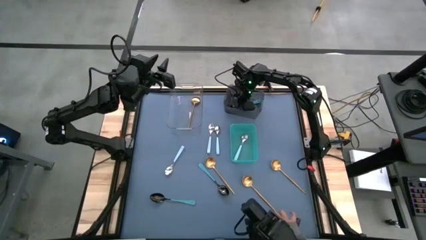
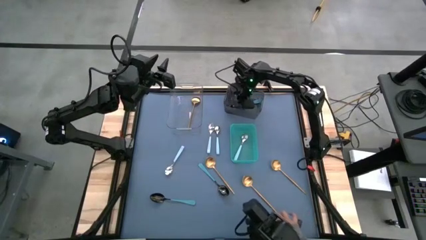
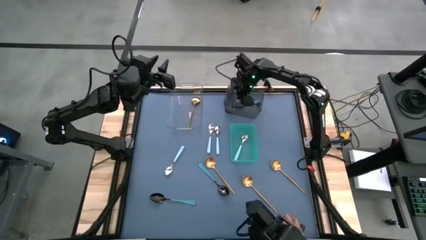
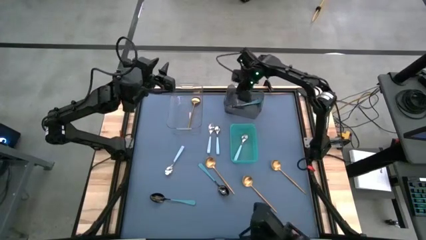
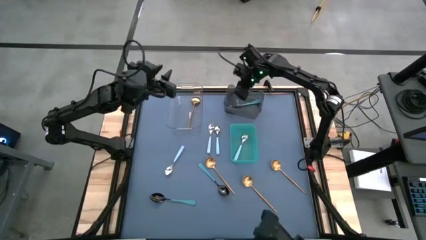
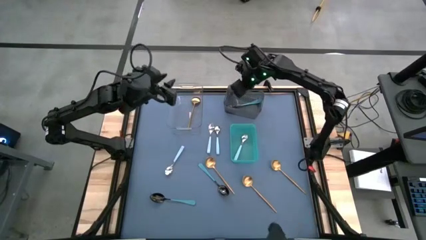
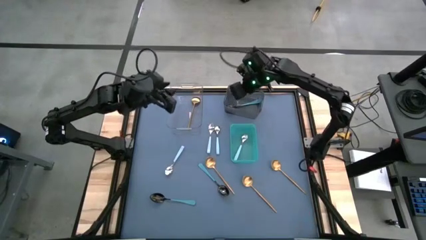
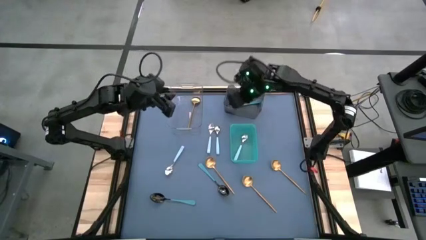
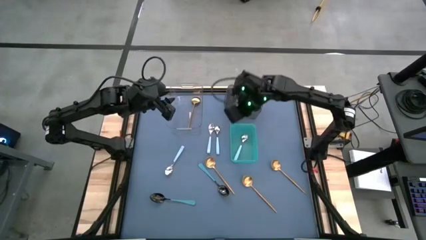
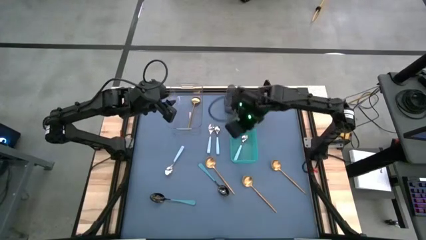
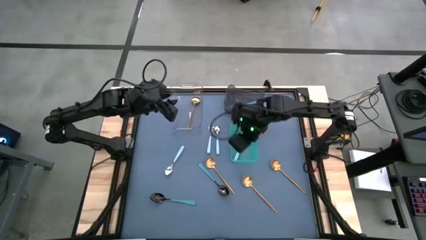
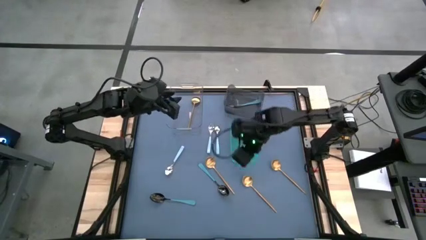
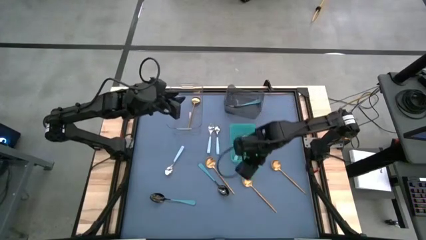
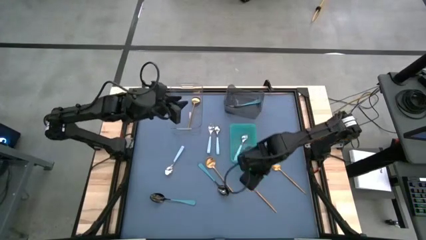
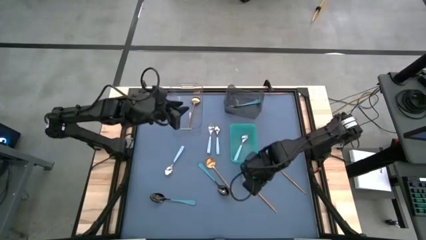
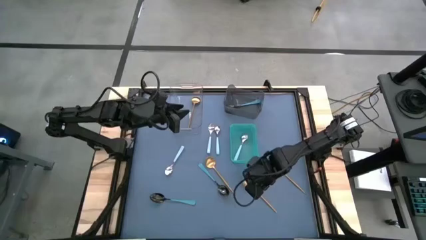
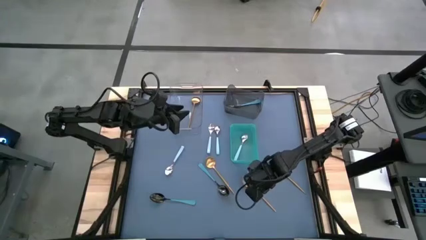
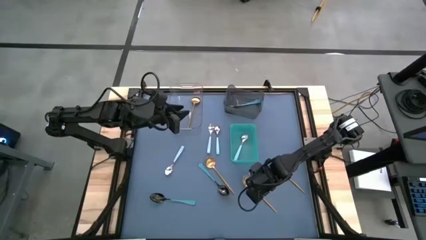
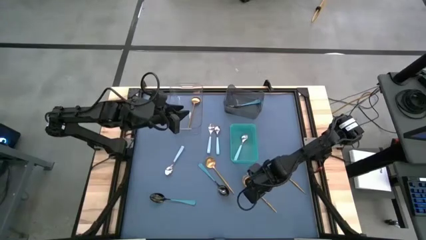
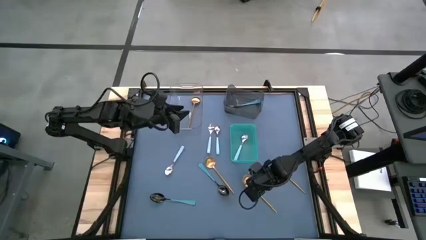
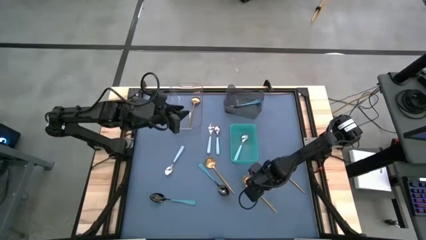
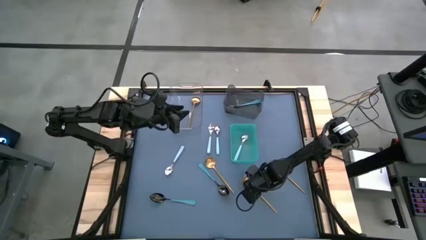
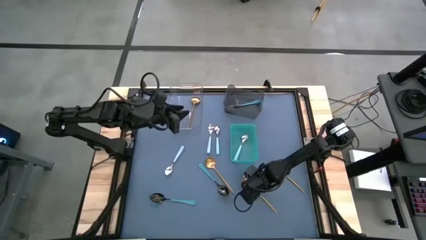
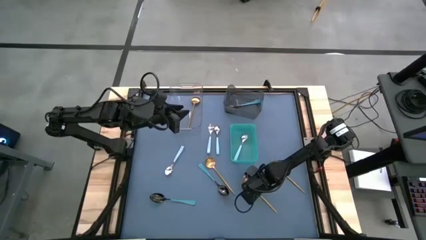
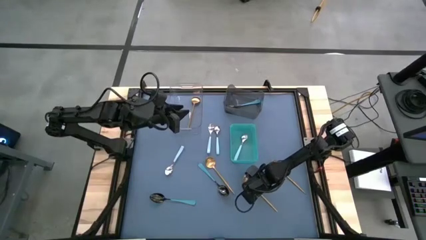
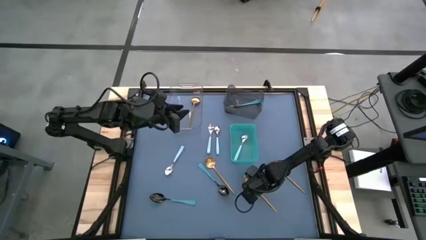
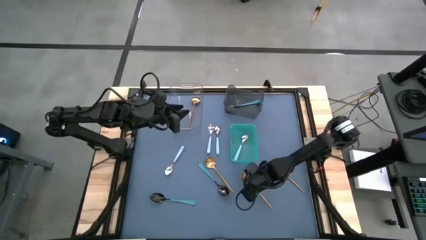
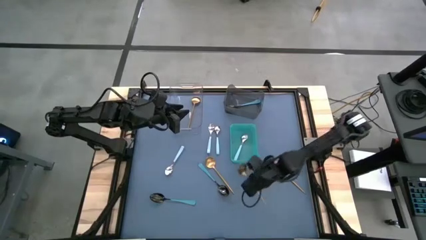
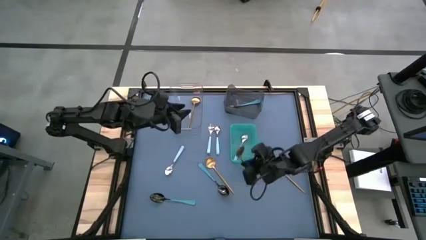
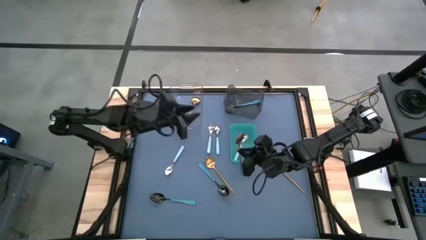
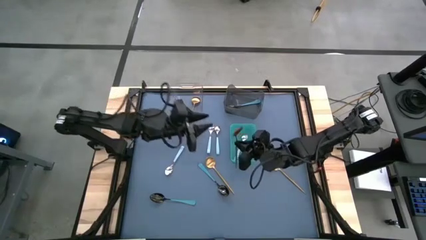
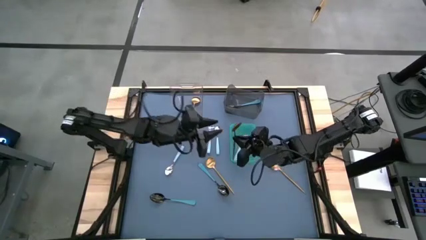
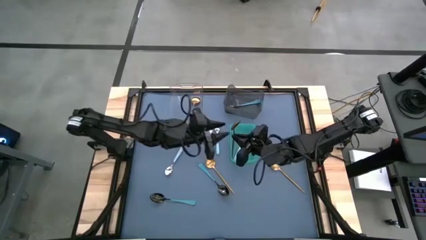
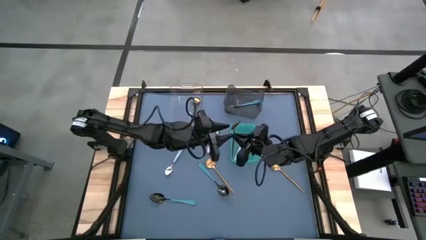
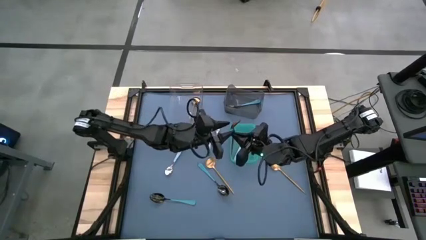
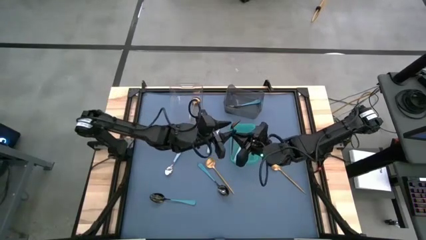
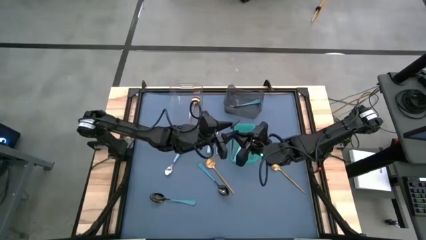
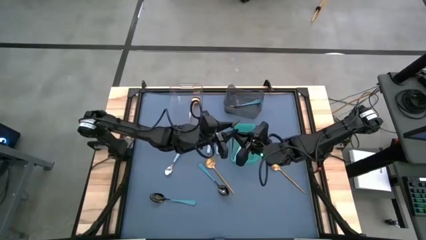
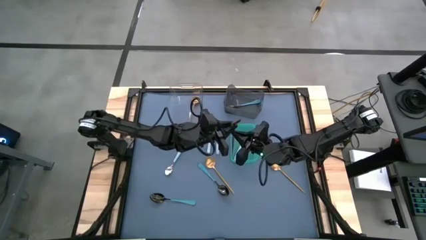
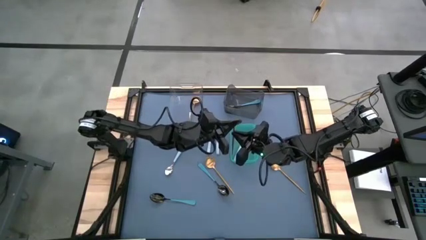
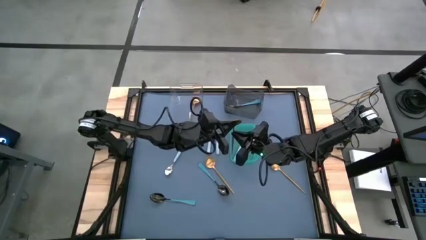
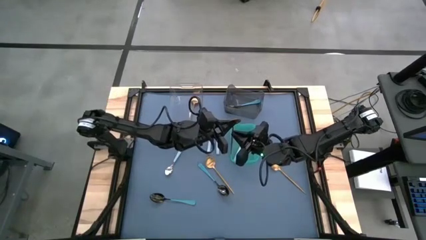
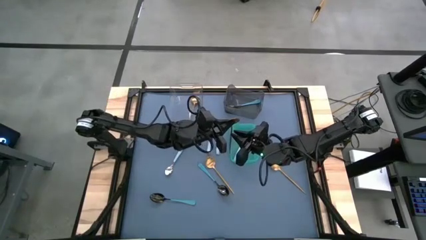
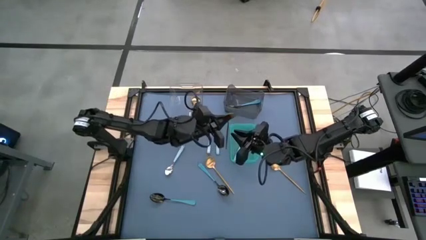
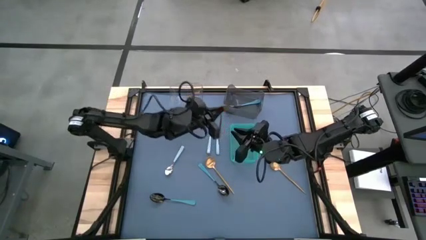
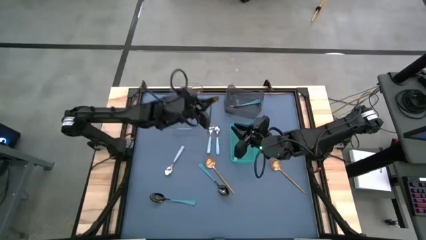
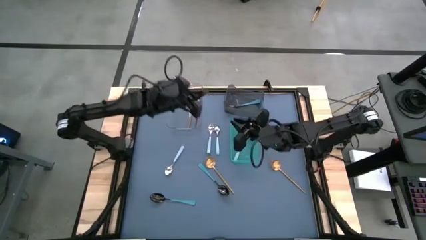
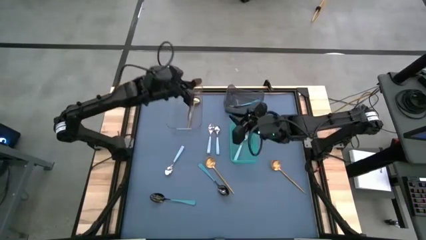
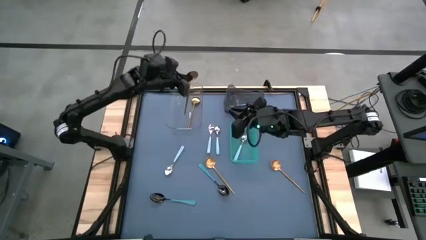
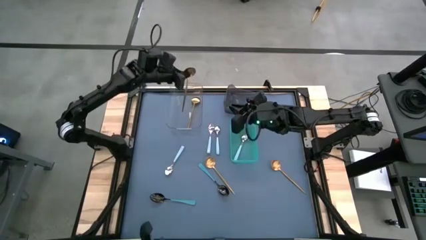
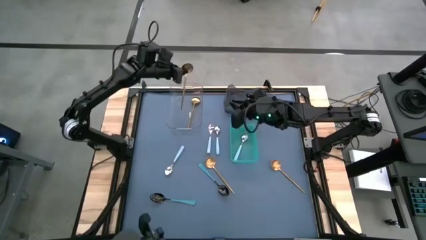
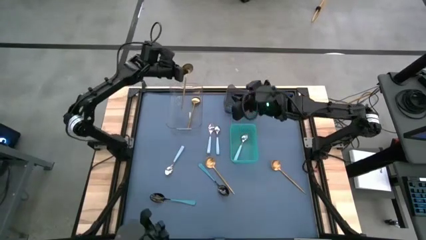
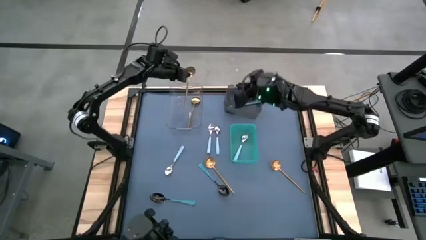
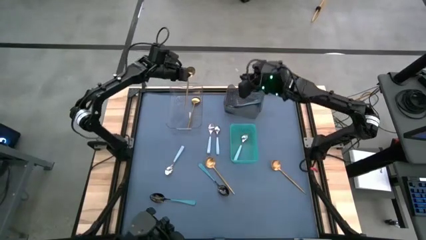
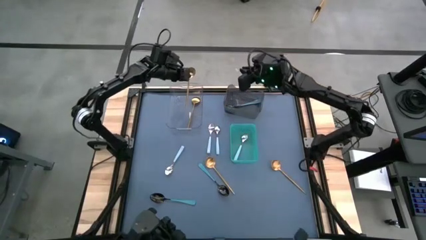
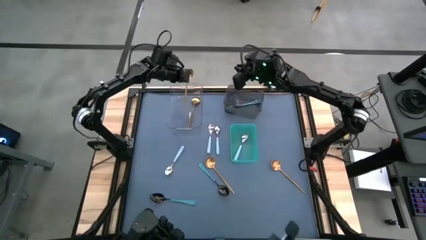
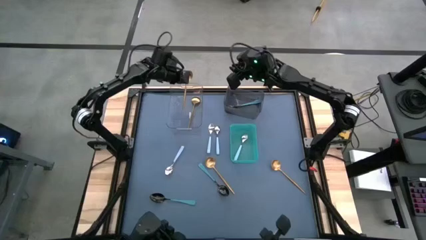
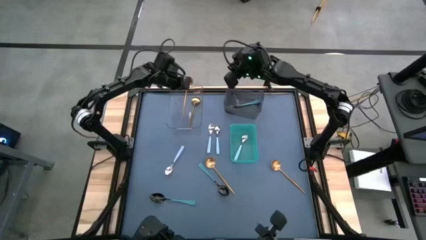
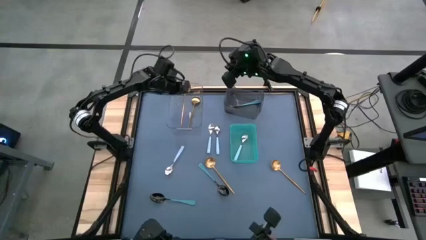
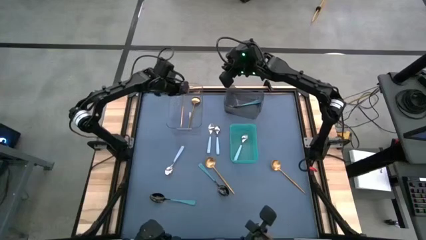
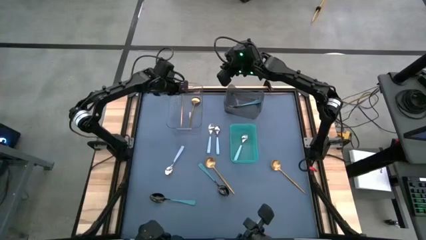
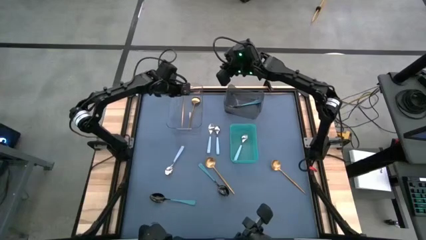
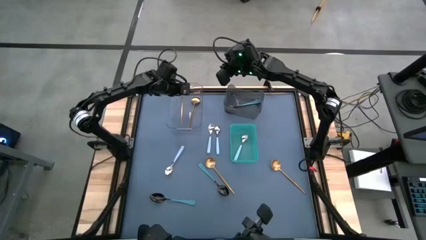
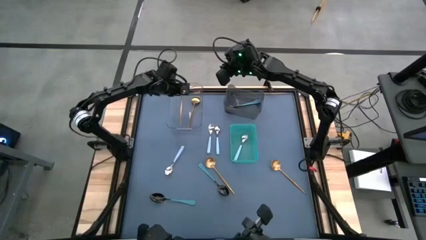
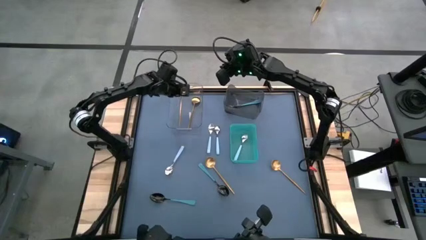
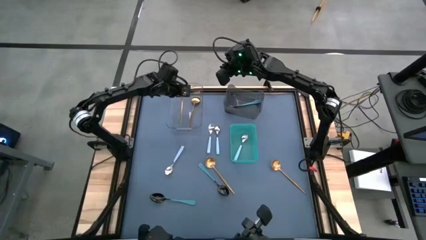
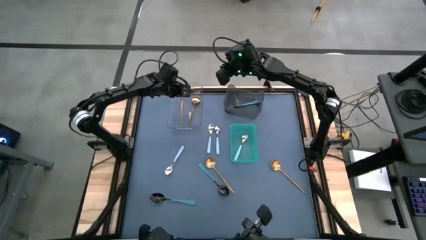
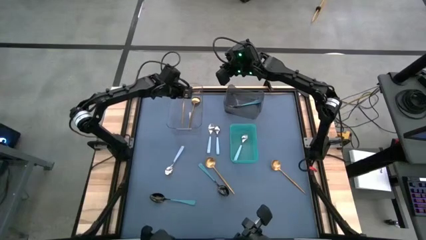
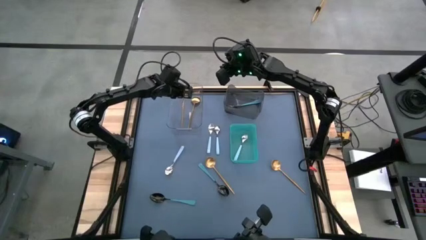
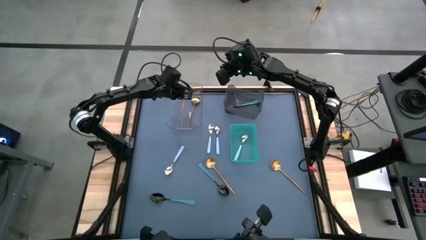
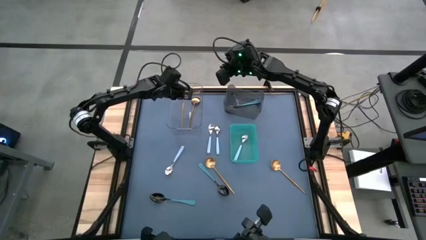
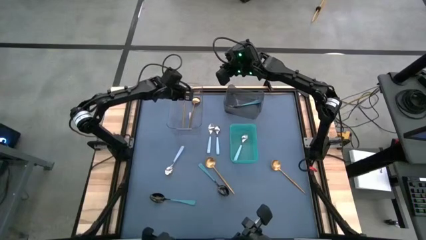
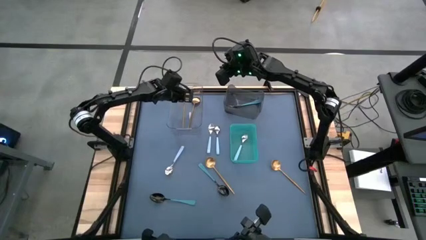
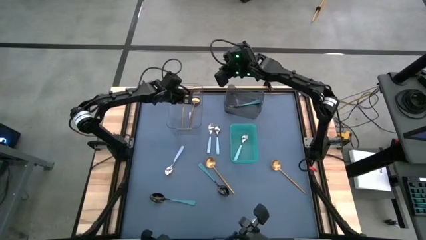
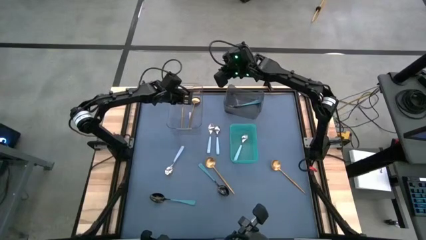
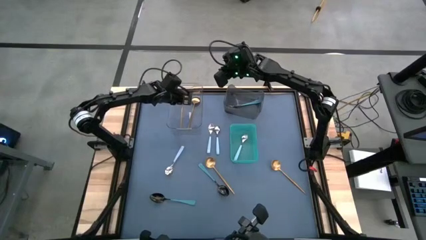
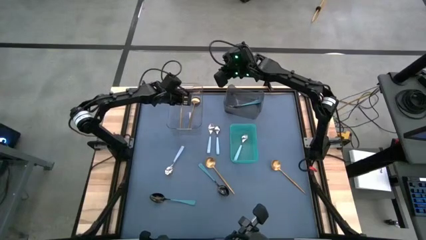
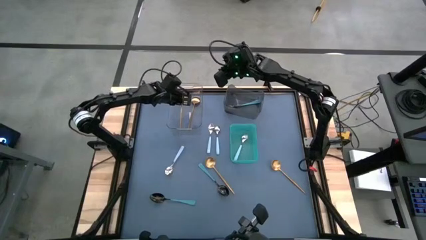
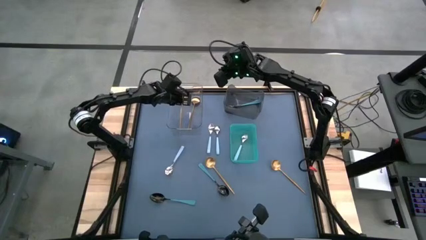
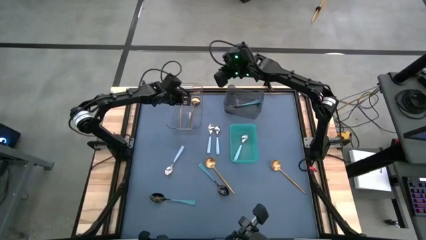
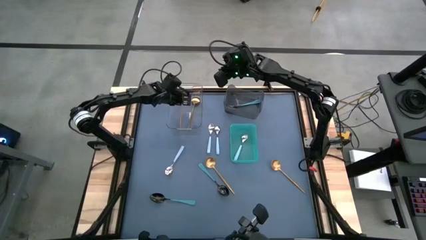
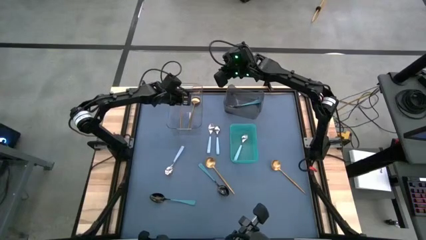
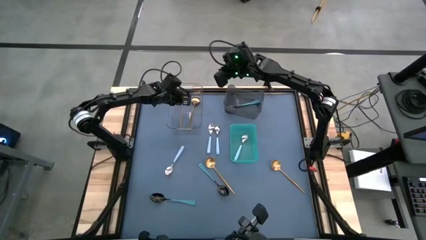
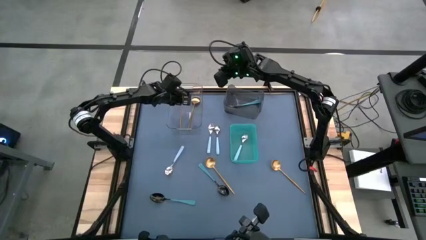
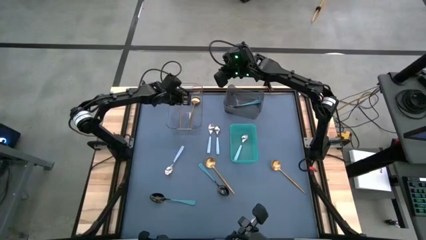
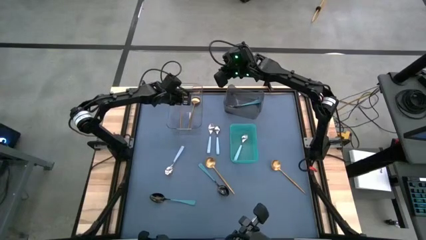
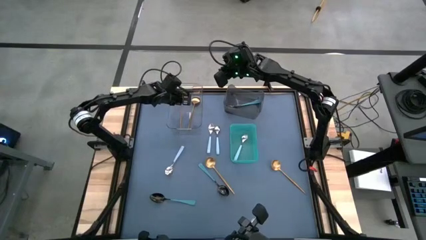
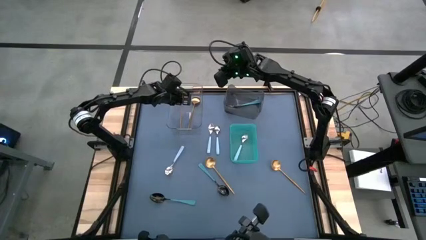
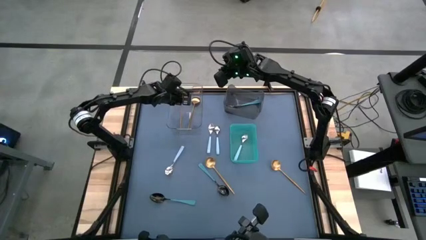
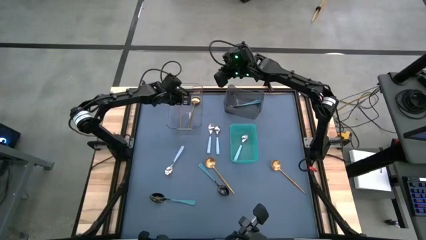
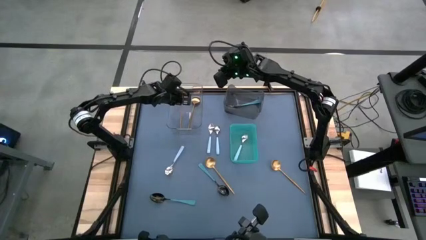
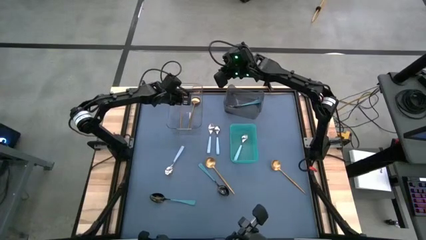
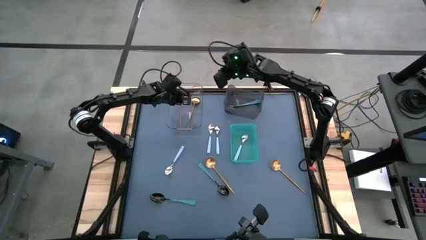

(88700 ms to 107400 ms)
Task: Sort silverware by color (type)
Put the gold spoon into the transparent bin
